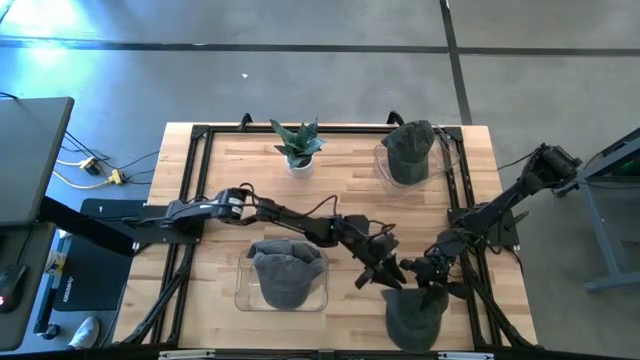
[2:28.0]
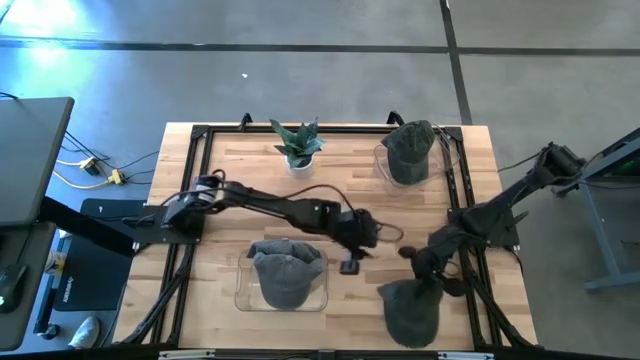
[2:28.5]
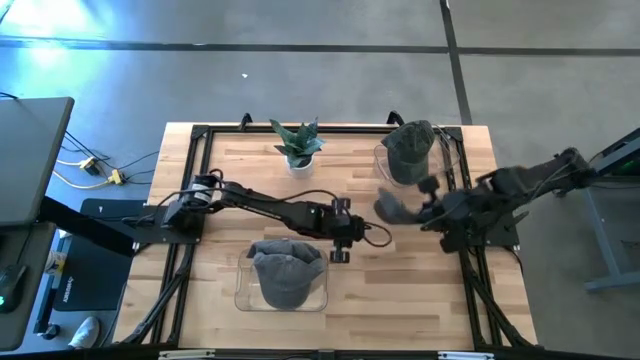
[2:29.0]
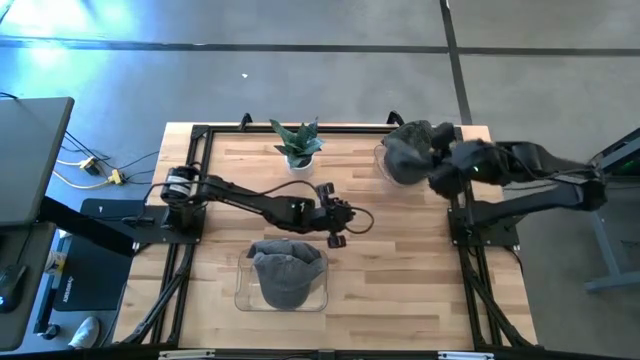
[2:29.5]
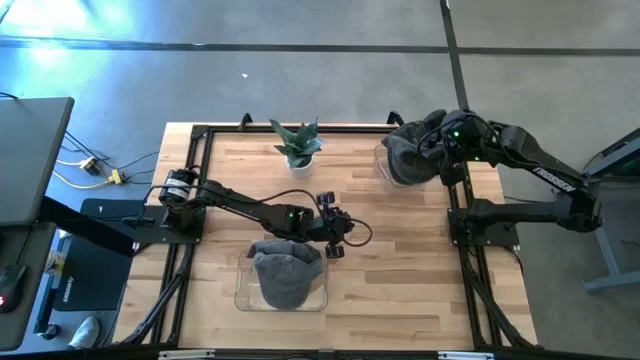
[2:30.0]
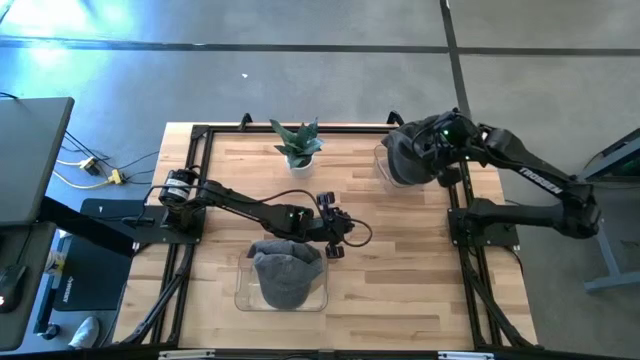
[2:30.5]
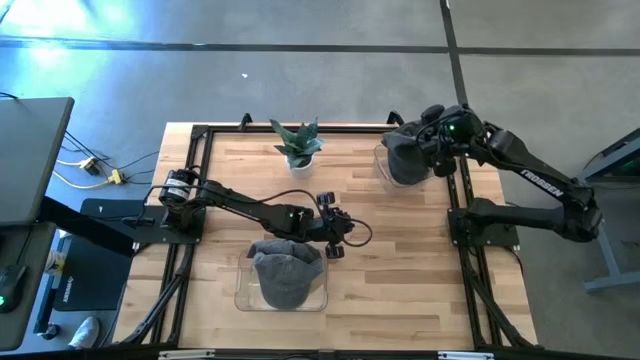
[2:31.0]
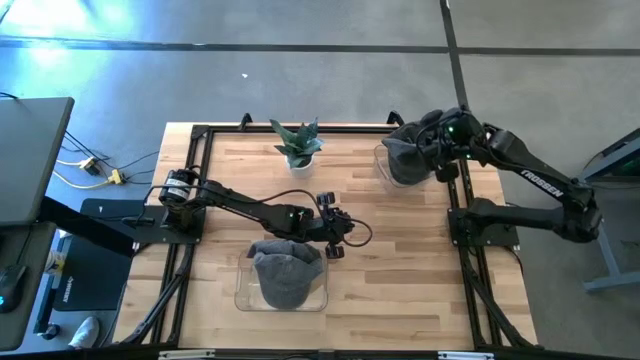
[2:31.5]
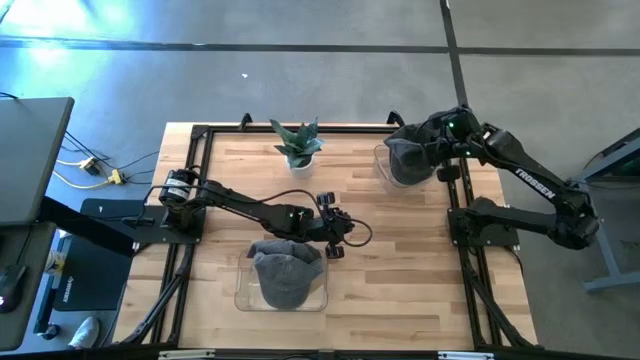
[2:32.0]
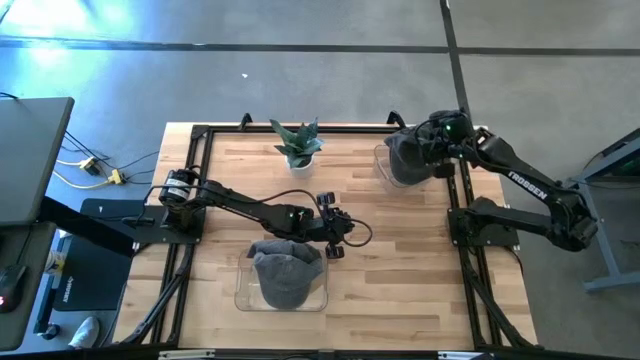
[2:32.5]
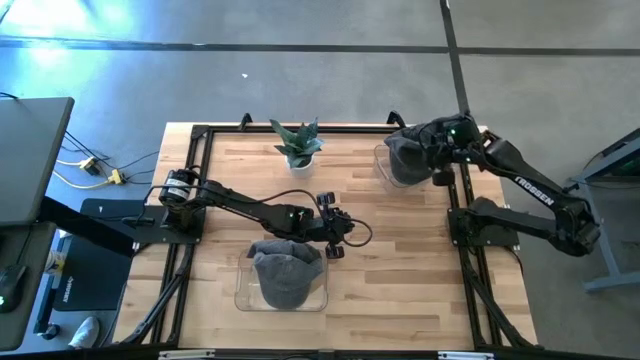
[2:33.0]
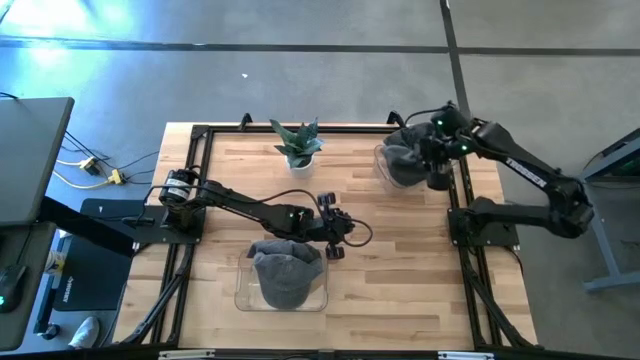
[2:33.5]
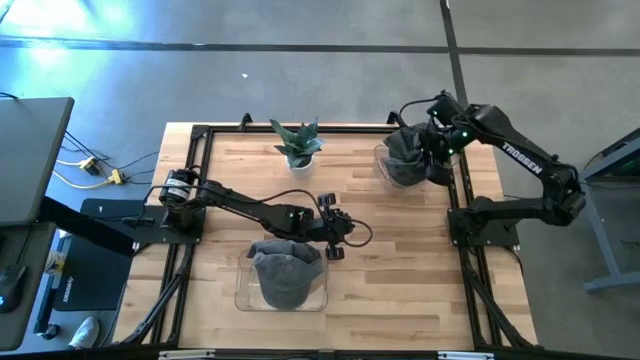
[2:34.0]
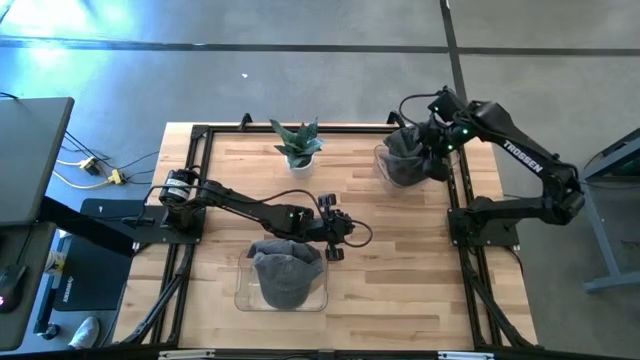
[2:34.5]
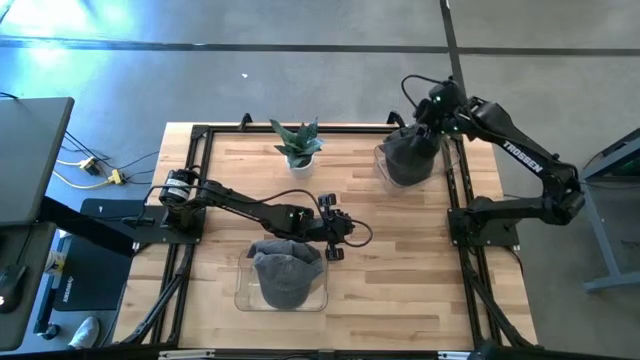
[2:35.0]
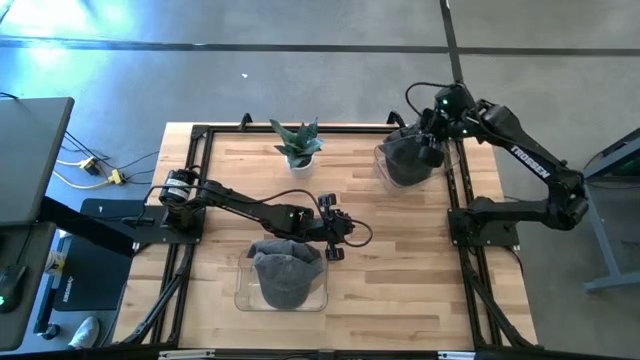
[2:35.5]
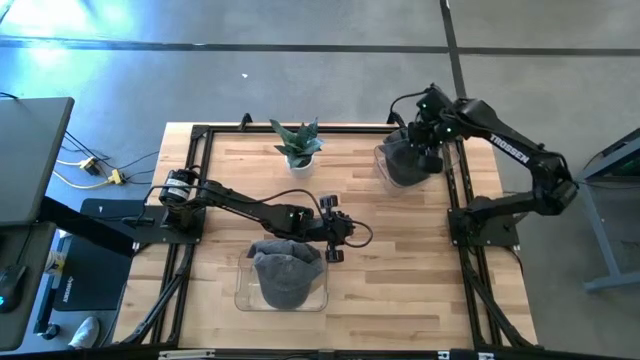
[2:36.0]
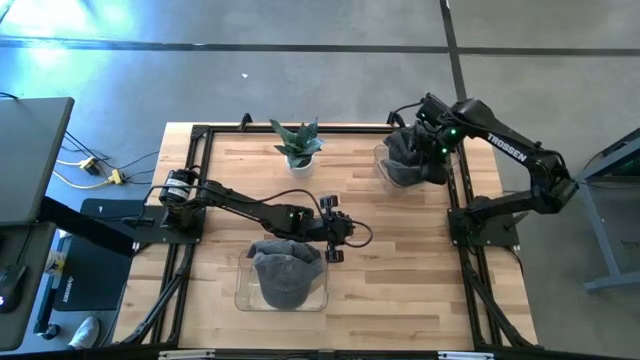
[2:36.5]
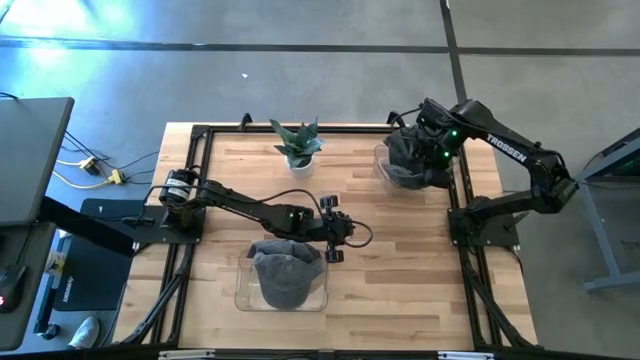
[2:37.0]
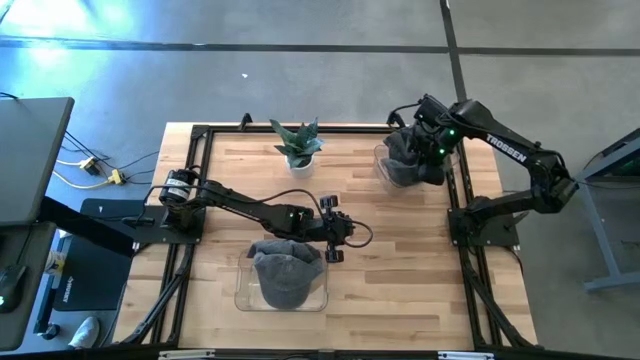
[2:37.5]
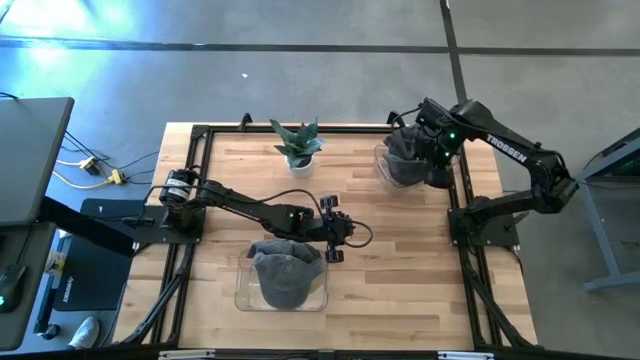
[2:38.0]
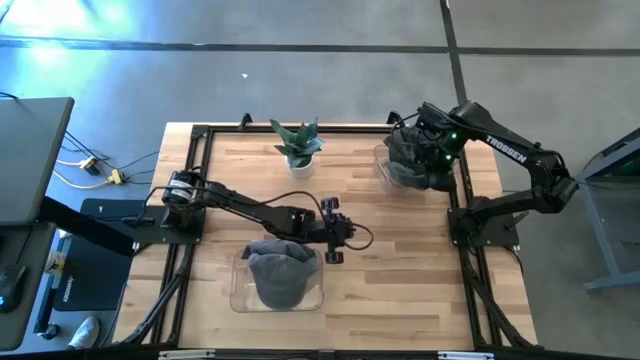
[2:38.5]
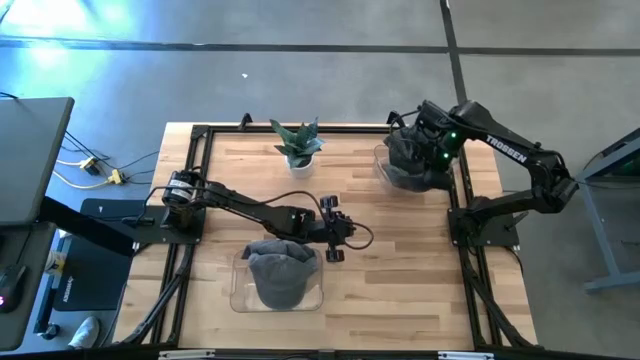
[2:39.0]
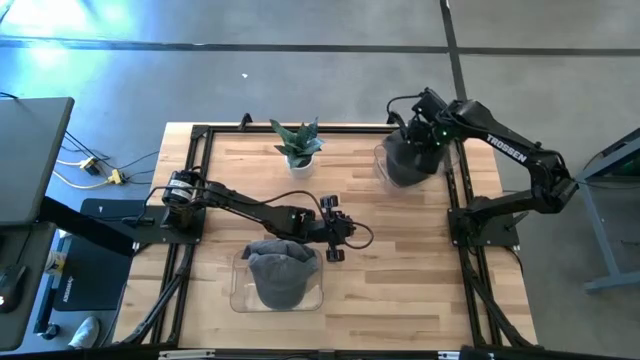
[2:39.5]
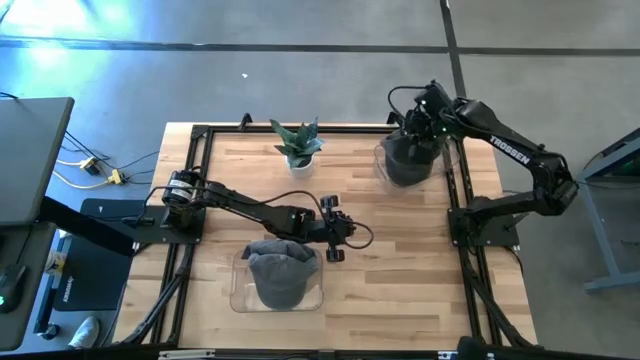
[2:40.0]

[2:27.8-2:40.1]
Task: Pick & Place hat
Put the dark green cap into the top transparent bin

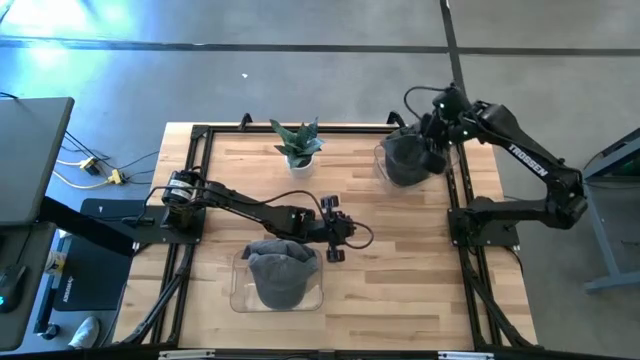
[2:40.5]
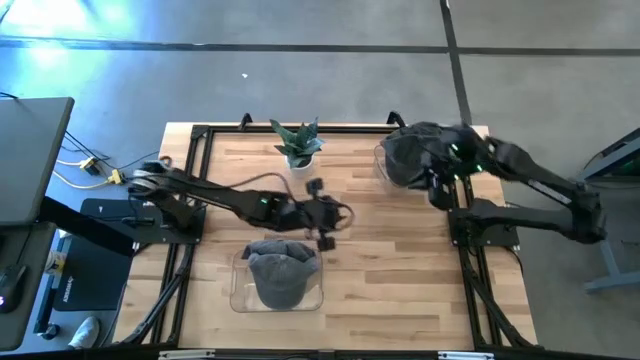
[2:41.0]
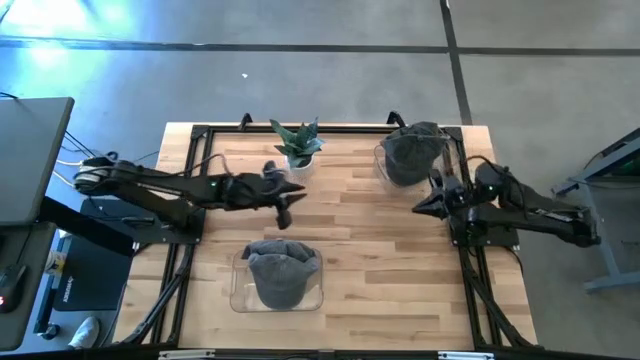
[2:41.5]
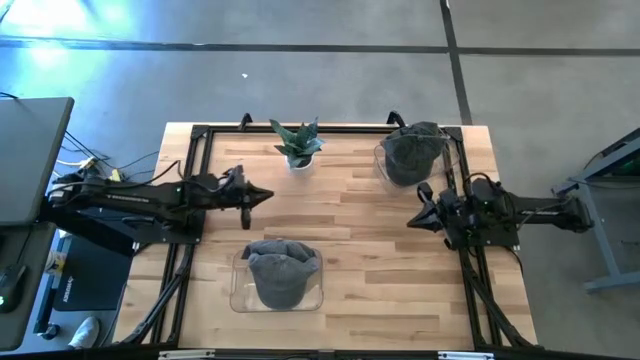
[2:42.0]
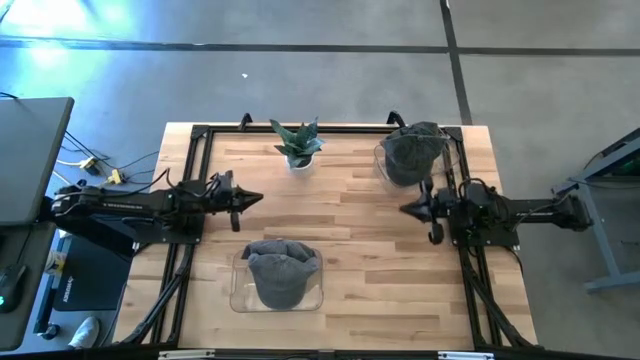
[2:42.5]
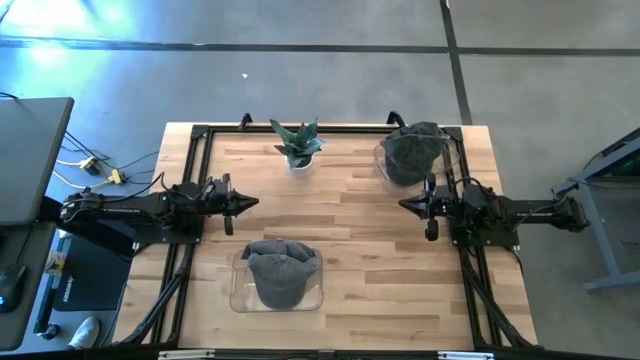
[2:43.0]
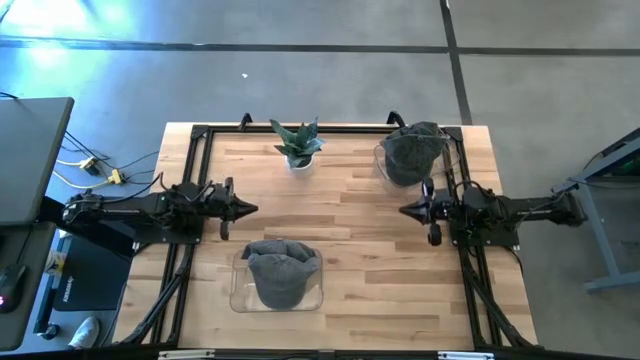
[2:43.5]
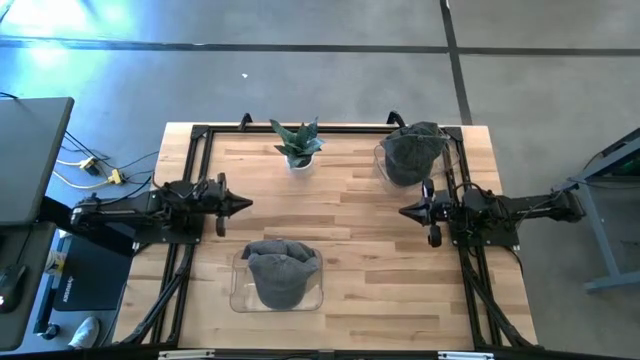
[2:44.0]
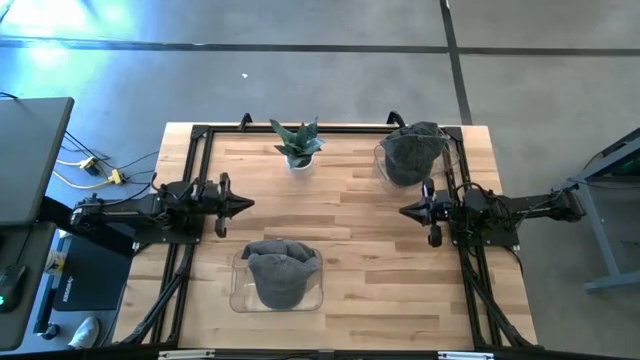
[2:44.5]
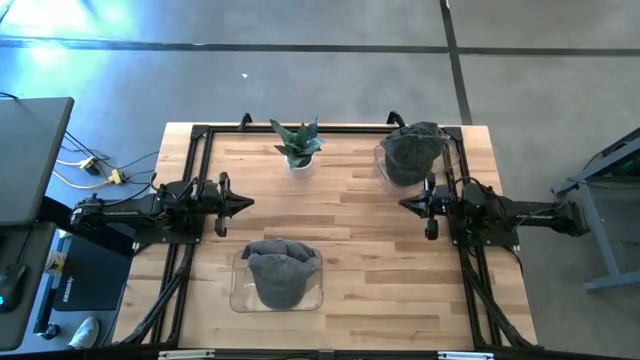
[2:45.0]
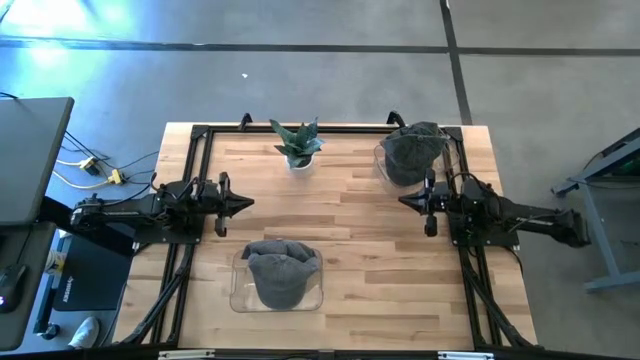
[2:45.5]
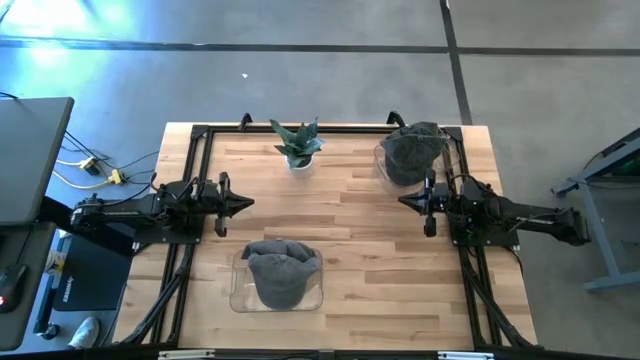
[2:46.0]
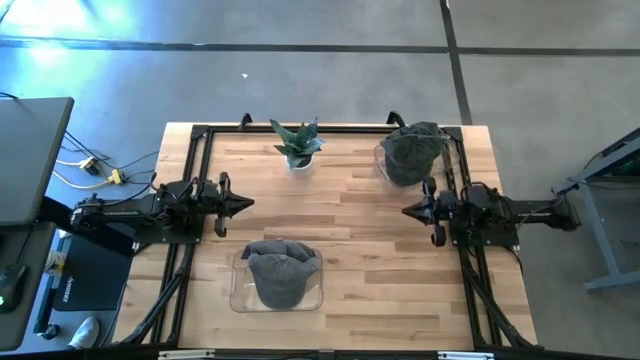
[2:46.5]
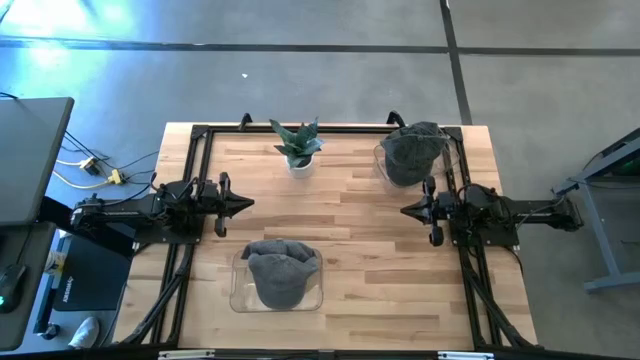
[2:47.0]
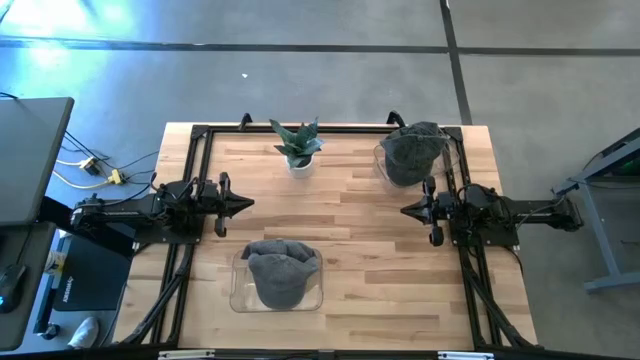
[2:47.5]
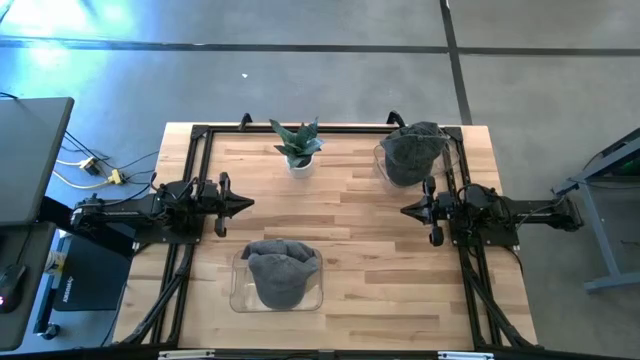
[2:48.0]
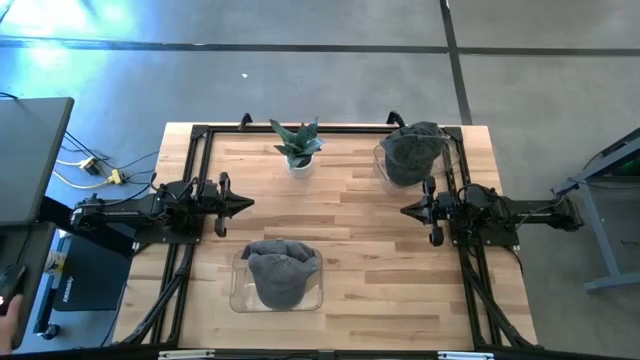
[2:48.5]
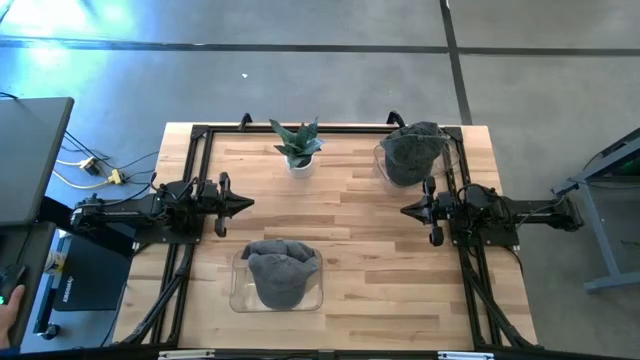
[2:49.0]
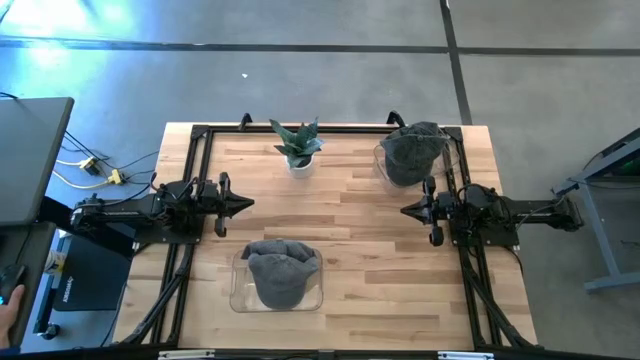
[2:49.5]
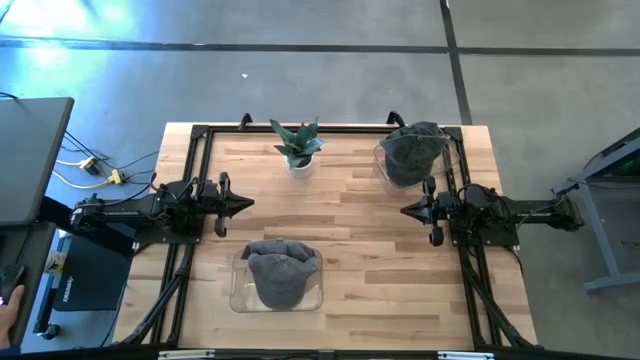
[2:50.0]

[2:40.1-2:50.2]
Return to Home Position
